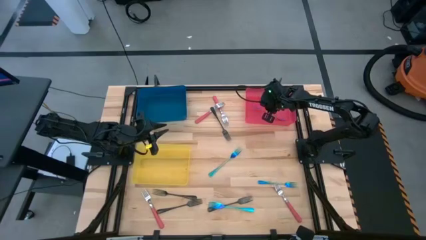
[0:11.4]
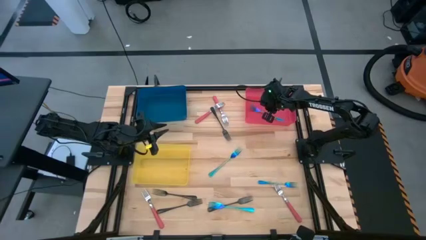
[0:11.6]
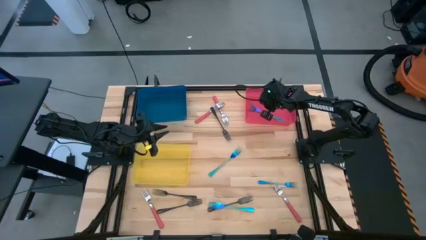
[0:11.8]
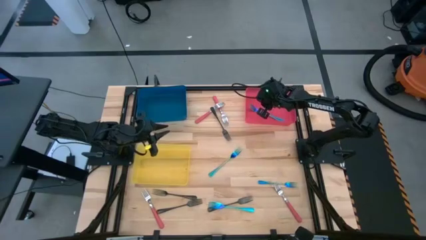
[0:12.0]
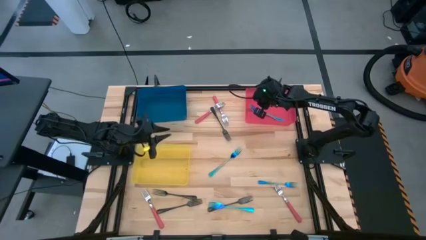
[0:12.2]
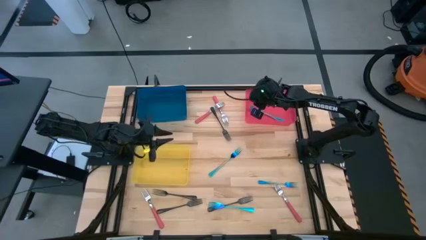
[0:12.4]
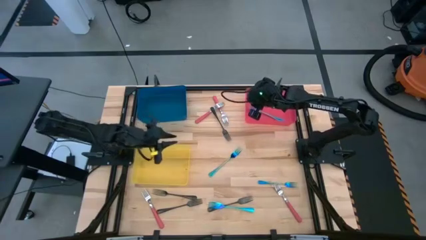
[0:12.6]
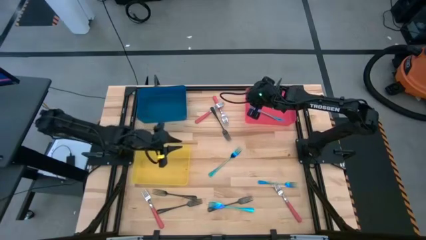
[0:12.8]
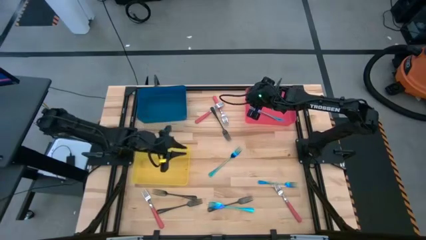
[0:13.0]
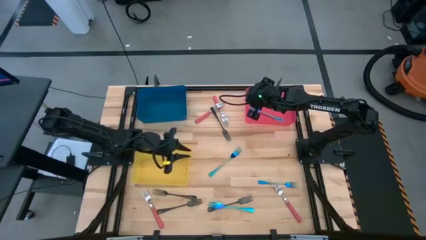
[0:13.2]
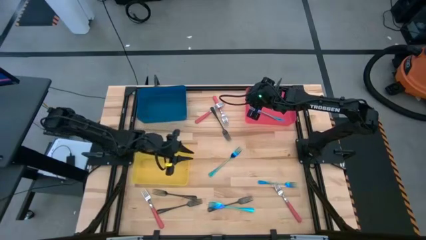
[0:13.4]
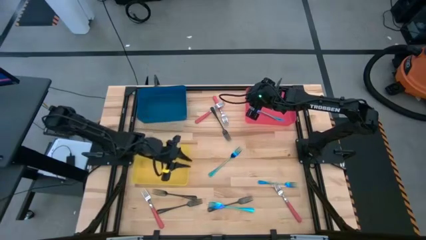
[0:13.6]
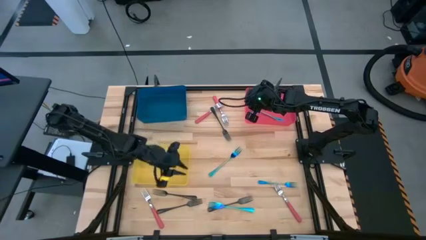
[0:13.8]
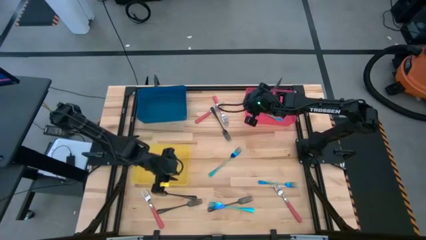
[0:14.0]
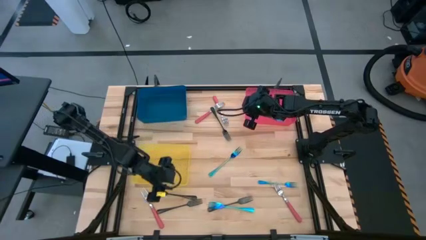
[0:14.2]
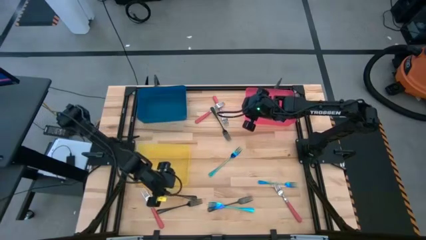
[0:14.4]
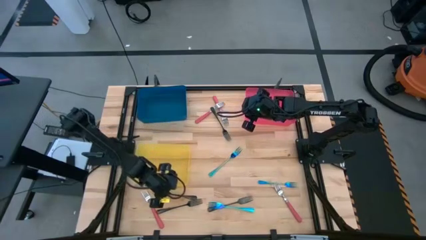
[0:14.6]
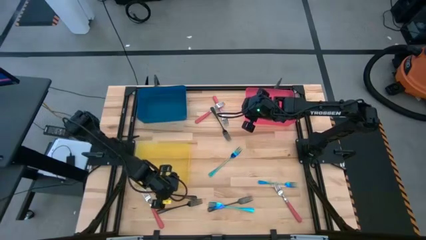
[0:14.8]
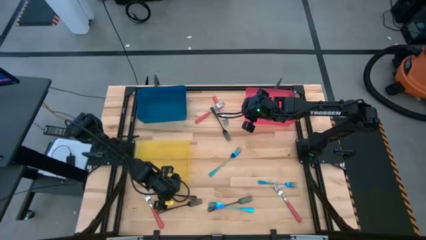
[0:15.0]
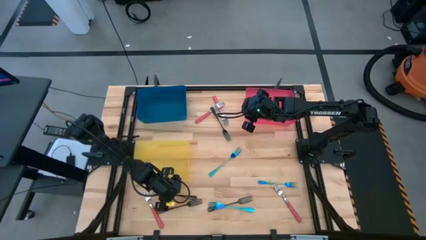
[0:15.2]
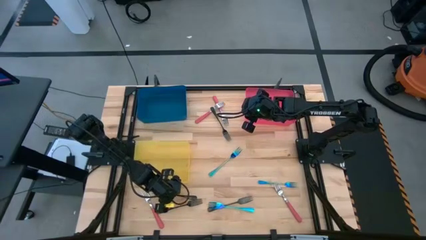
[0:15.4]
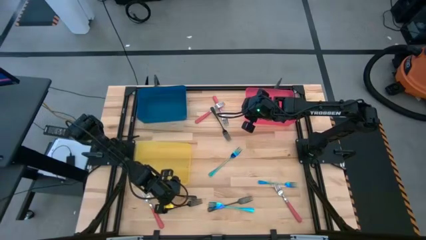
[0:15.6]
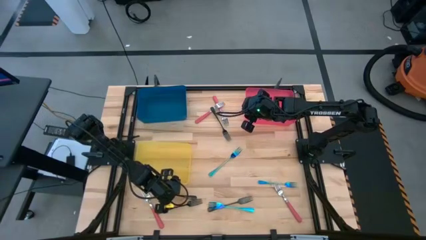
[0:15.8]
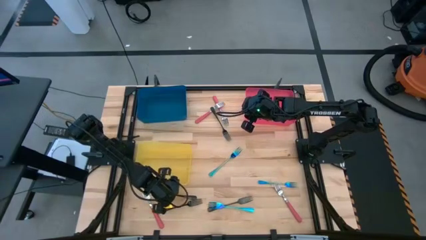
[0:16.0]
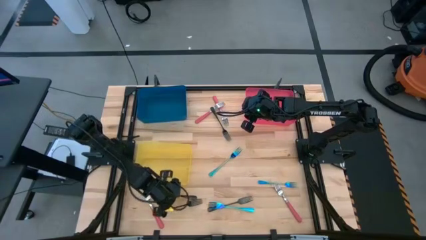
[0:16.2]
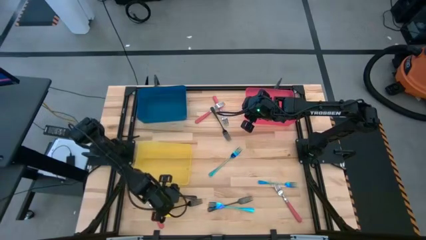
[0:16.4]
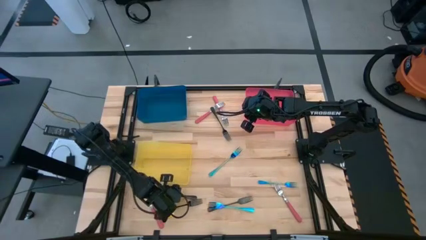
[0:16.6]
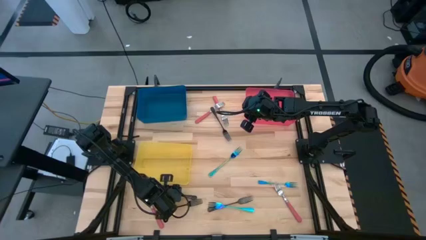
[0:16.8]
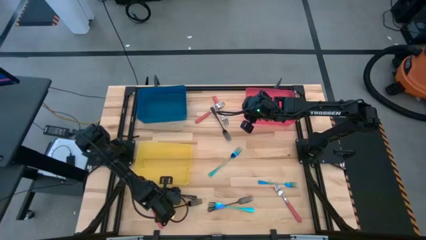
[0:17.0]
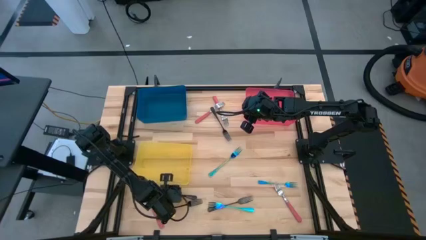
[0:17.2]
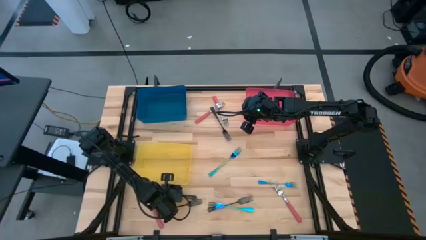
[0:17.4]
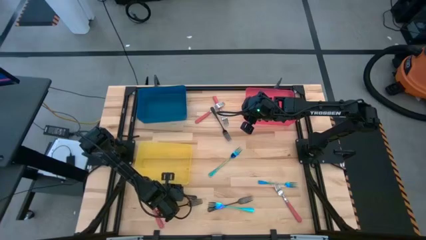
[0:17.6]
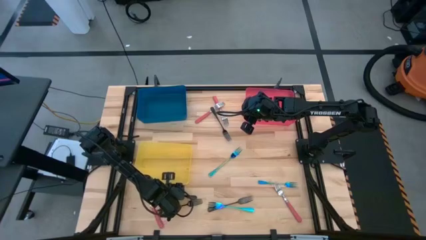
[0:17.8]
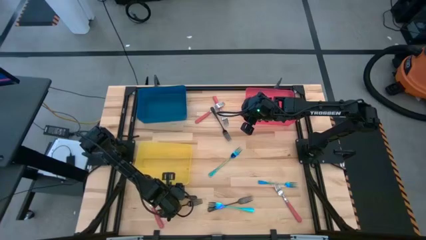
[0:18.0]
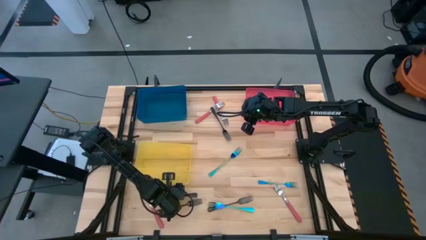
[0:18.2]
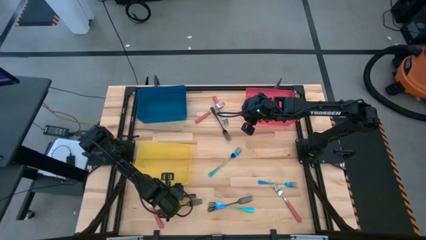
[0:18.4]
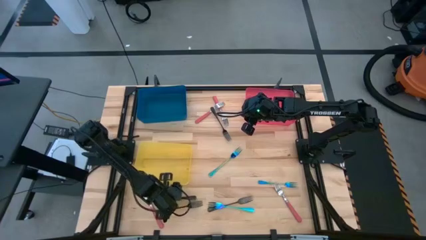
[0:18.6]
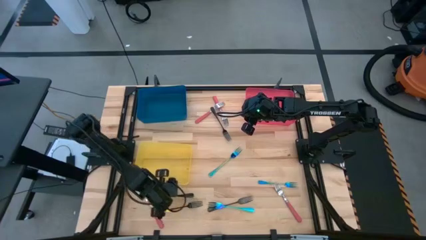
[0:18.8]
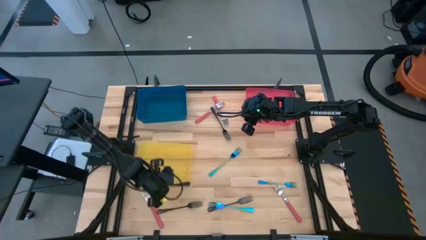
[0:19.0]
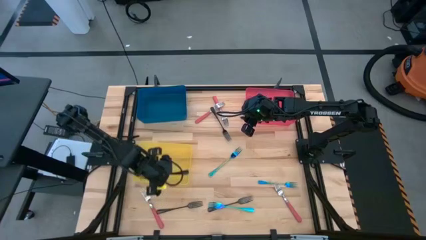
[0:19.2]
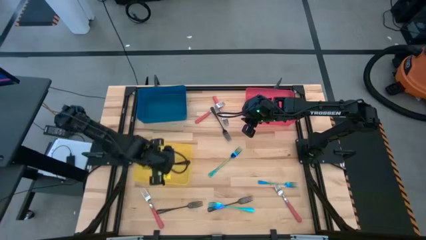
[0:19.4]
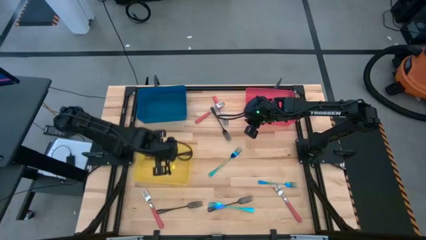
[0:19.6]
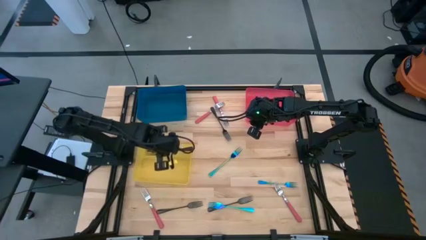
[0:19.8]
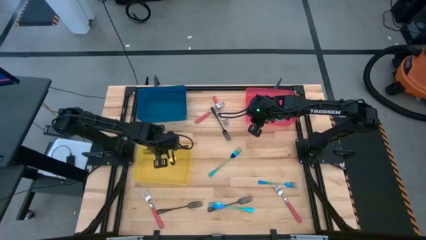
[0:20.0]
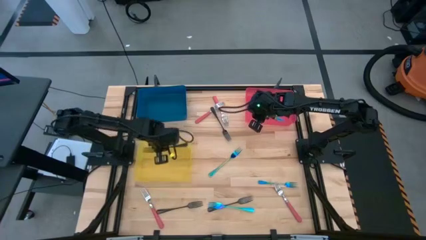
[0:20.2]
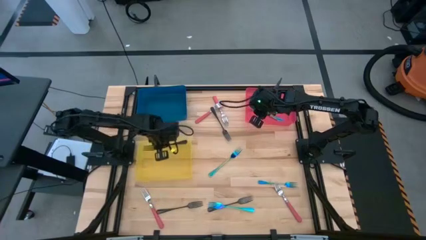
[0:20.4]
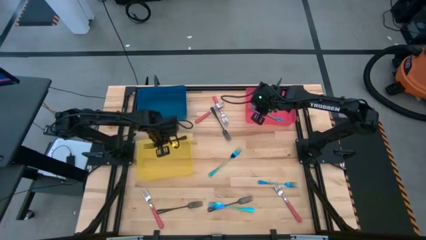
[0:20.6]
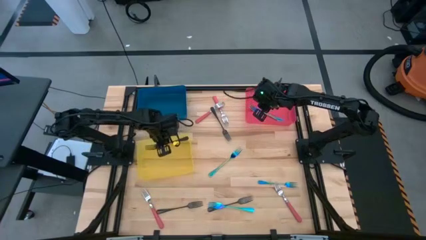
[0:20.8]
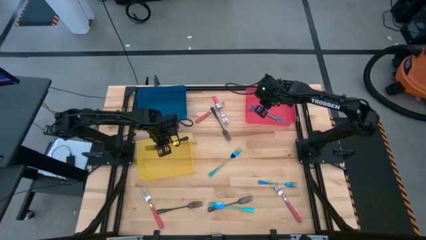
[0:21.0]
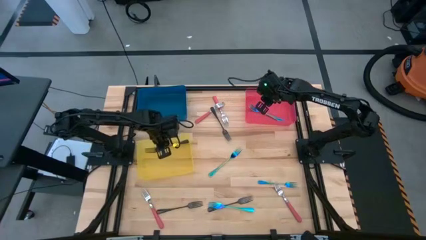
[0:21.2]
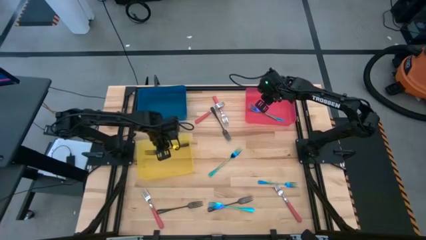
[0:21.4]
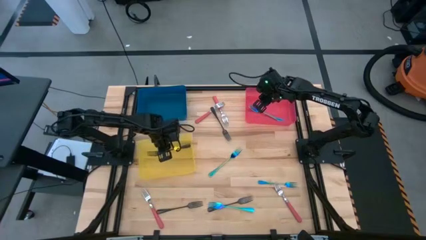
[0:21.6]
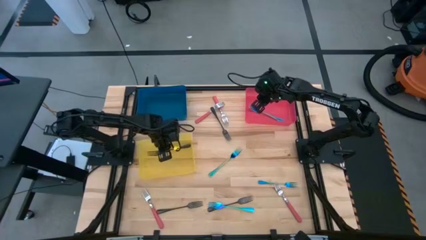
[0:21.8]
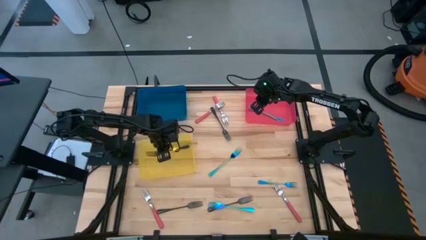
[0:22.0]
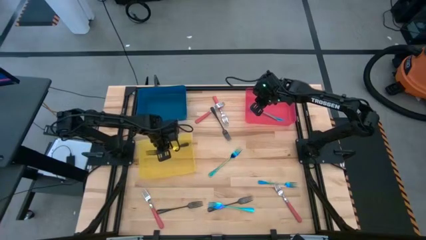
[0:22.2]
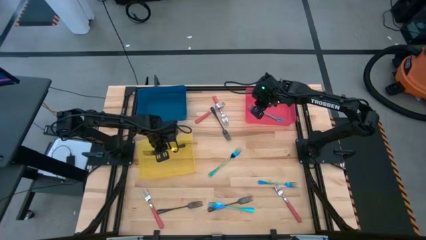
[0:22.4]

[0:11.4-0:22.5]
Task: Sort silverware by color (type)
Put the middle left black fork into the yellow bin
